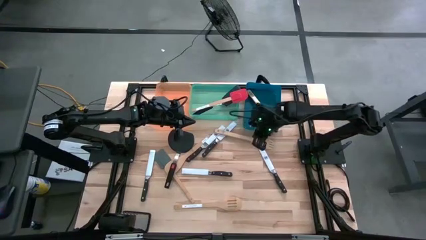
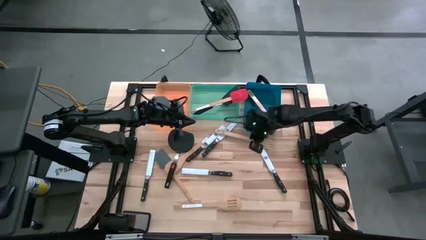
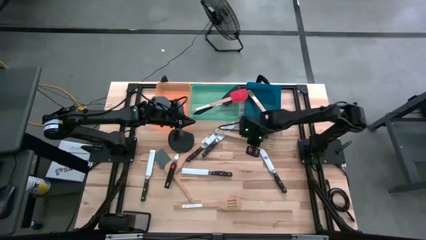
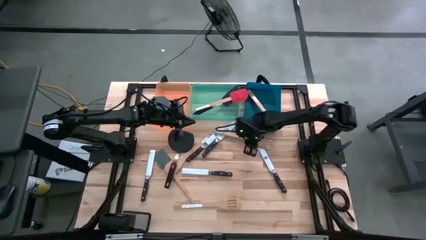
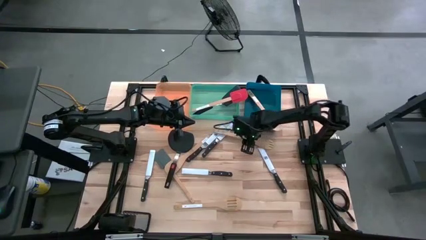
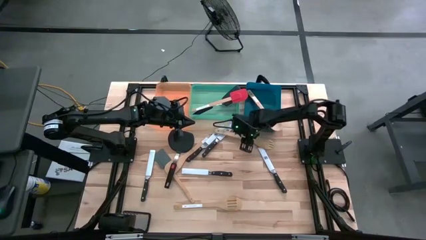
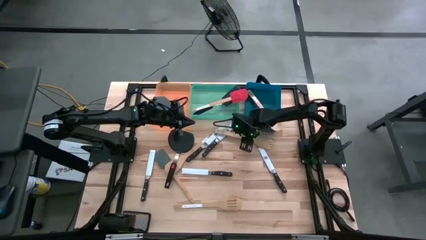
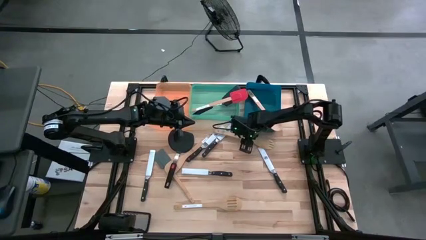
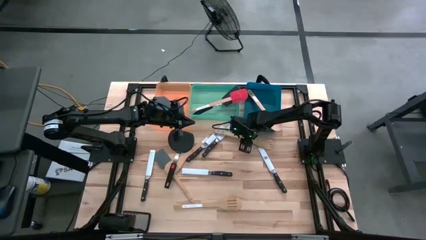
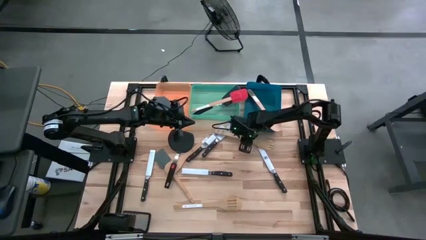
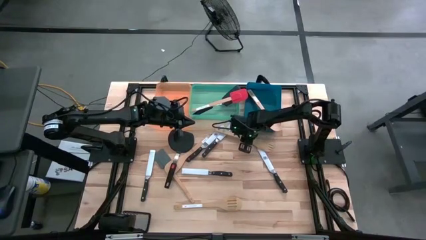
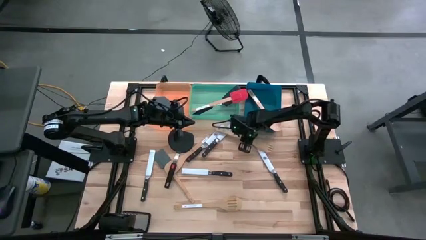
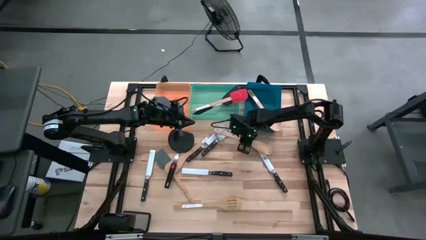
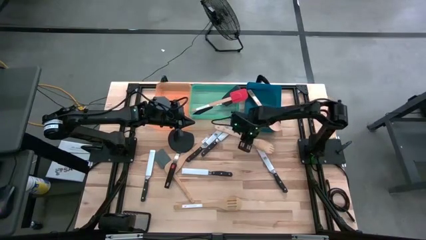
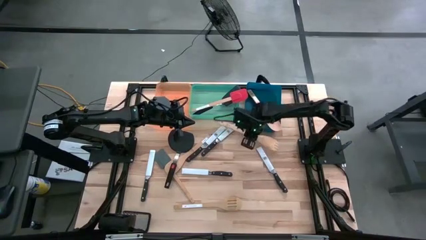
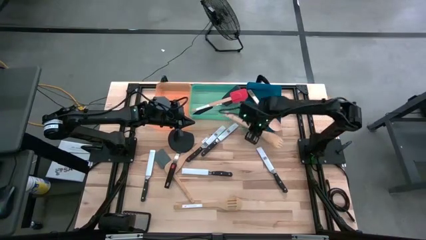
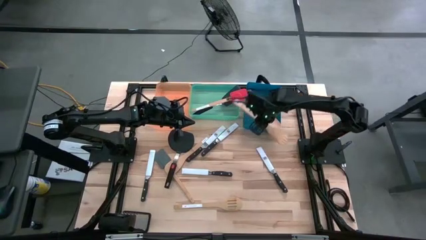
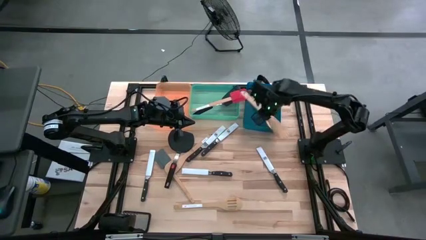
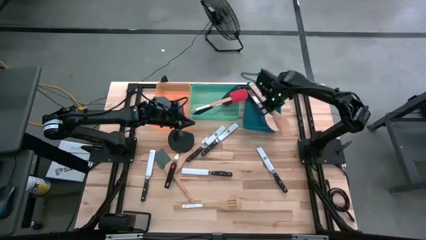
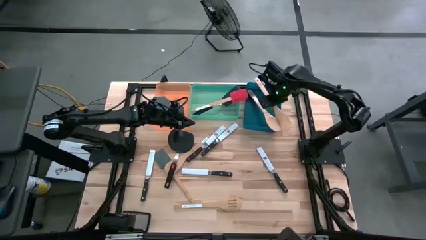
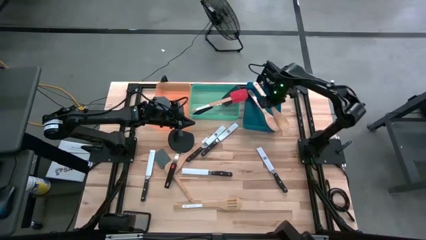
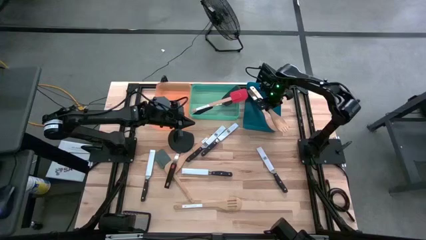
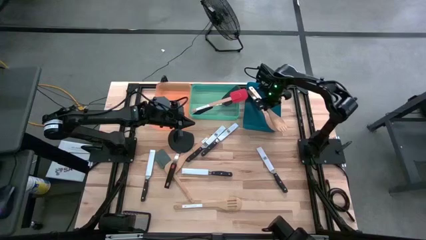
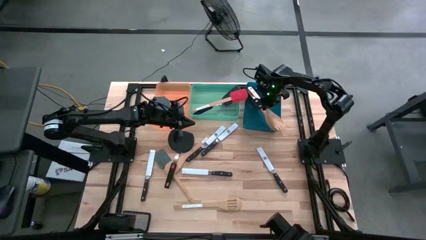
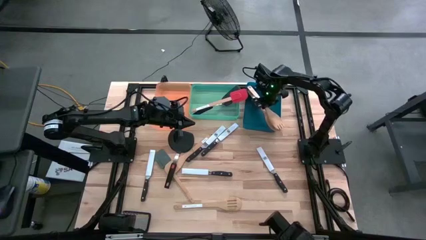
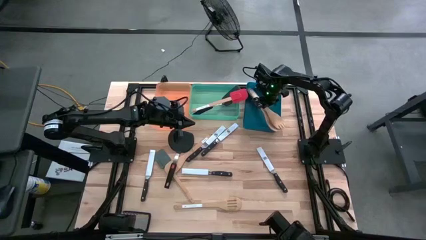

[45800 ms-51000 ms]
Task: Pick & Place Kitchen Items
Put the brown serving spoon into the blue bin

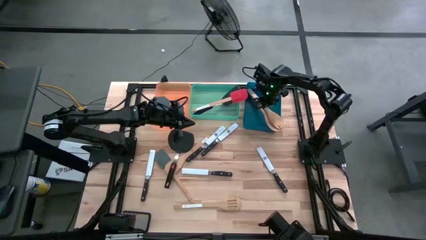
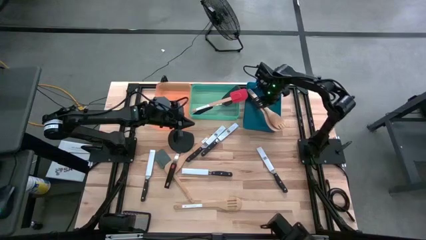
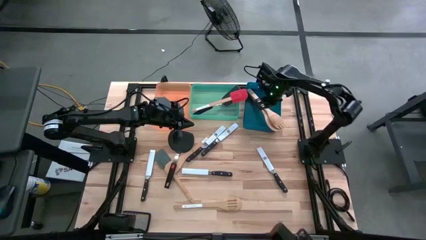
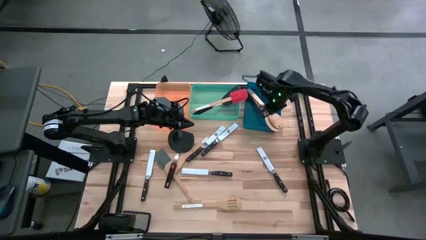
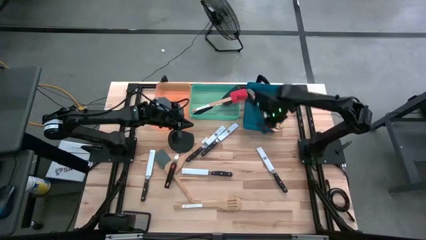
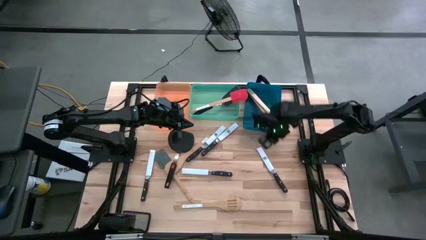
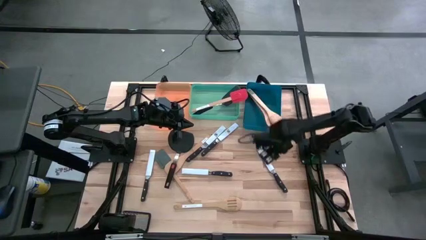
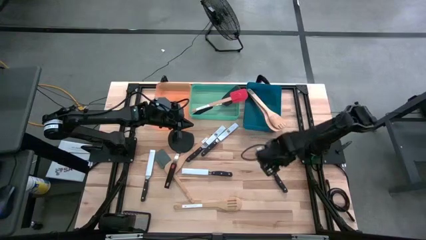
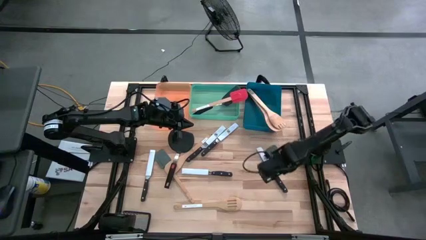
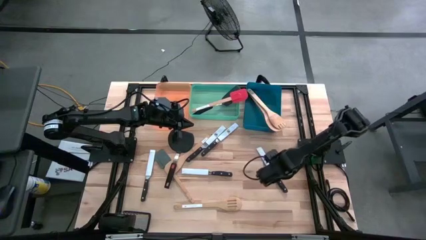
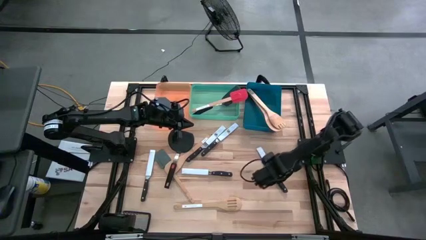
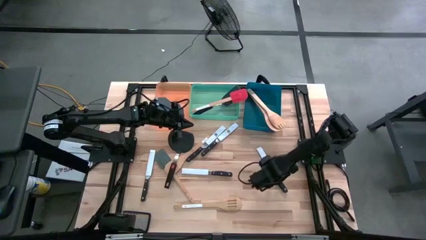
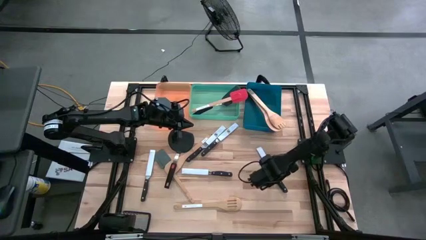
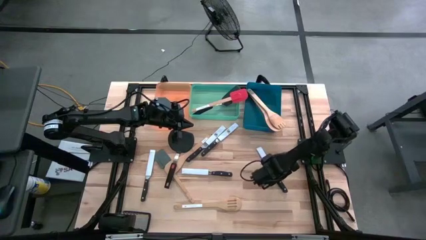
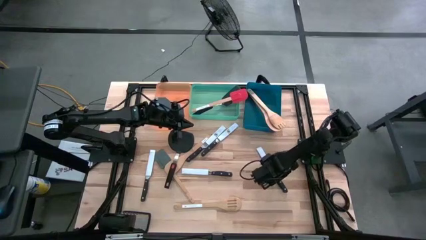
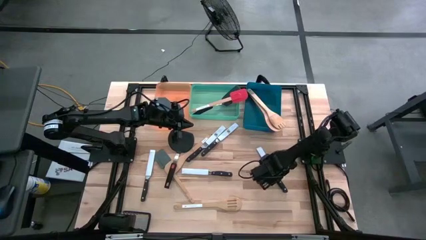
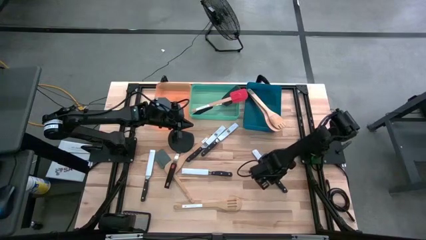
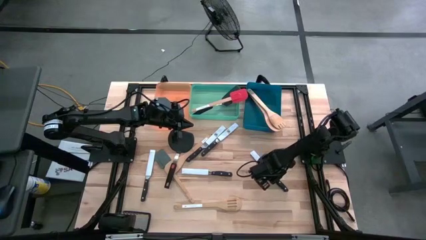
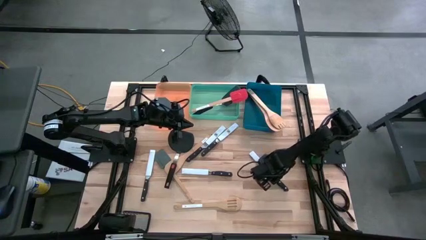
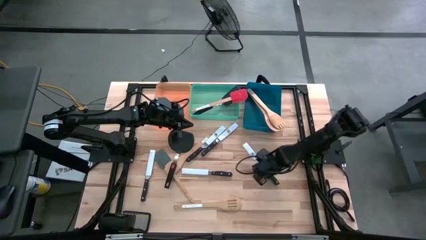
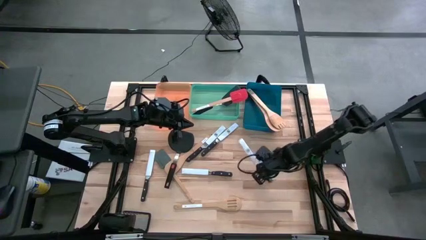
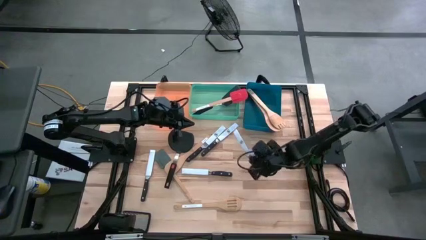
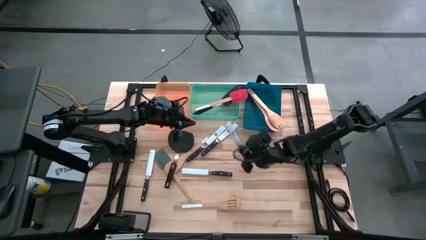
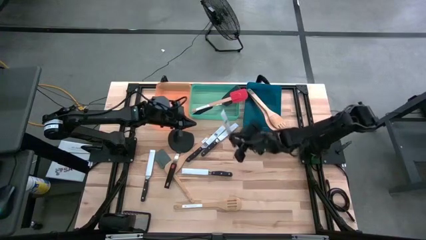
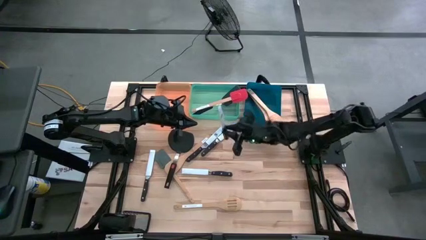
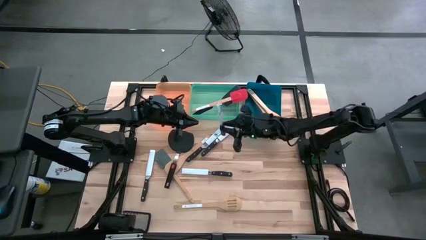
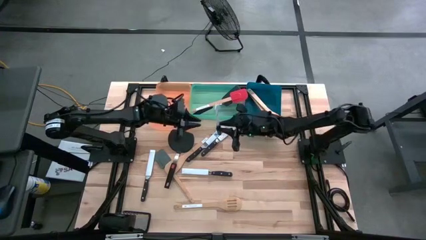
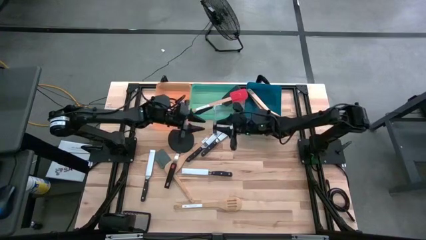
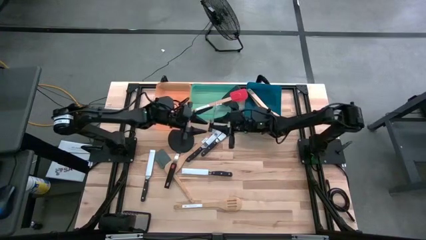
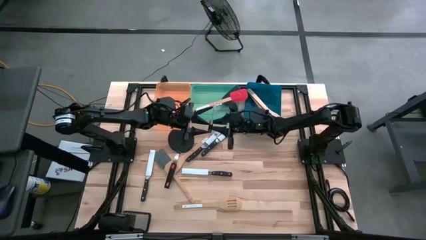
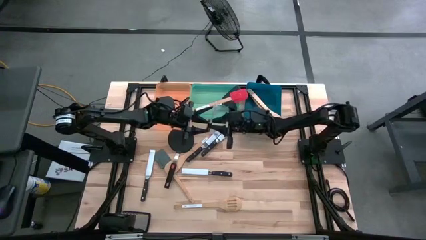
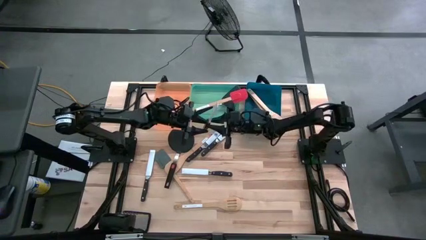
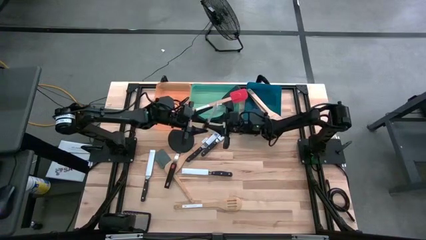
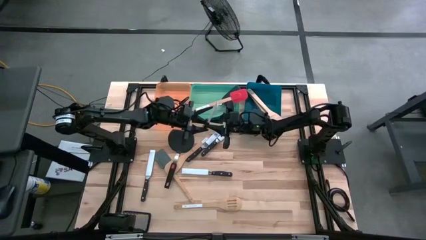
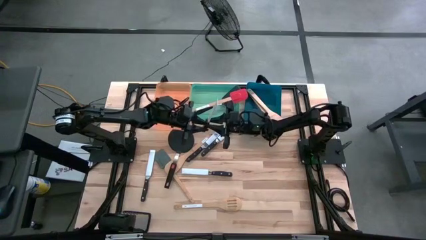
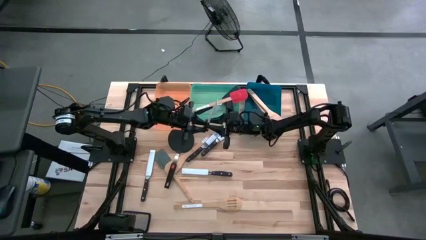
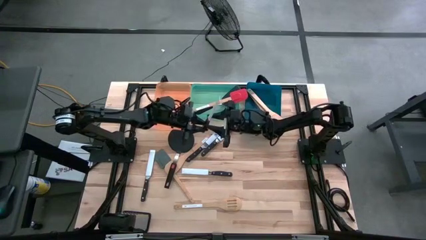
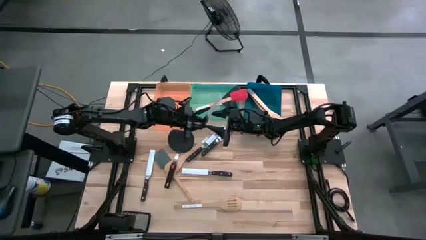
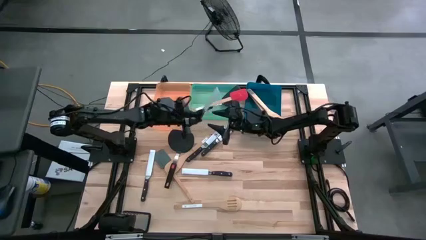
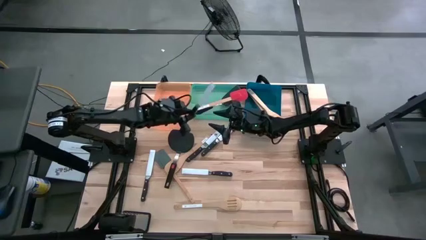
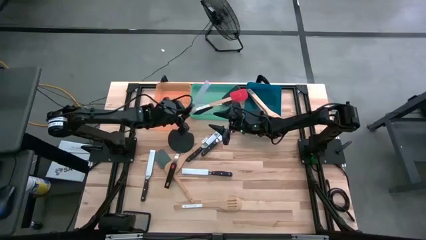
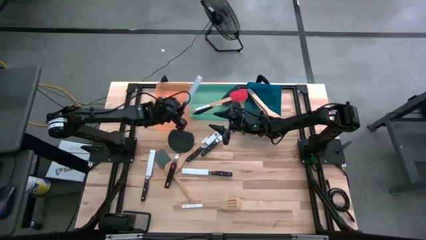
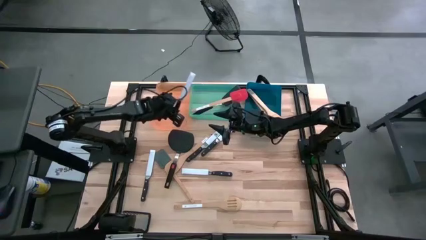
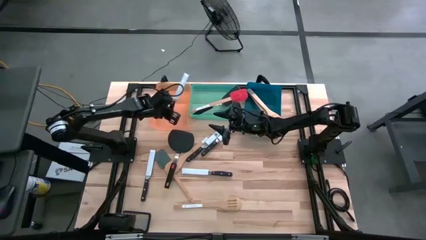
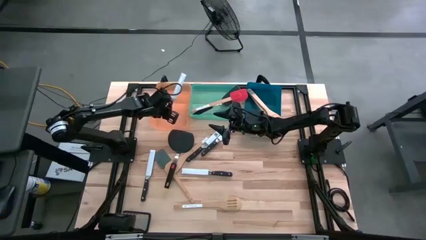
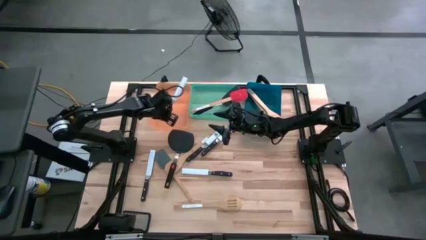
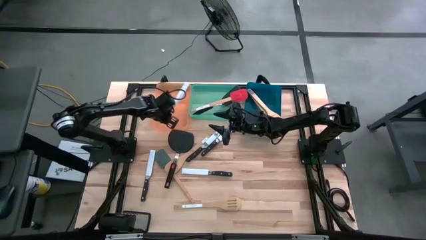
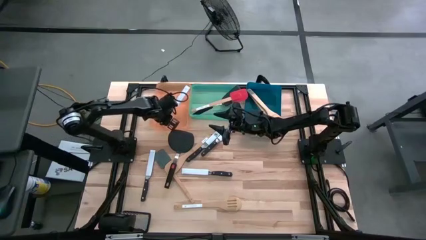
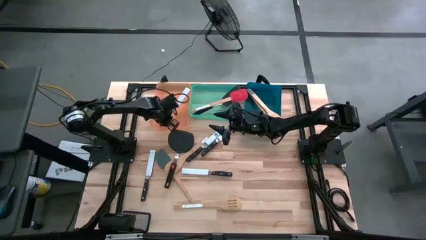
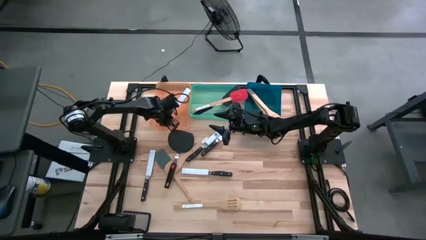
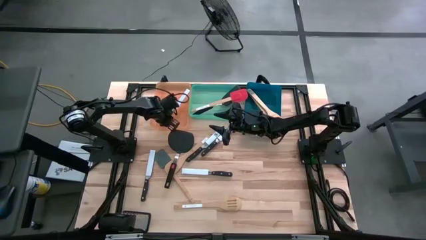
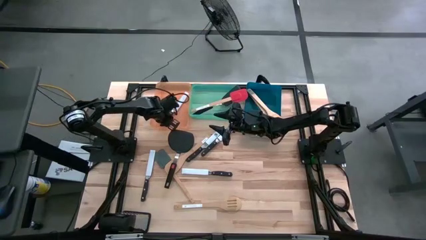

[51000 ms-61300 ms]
Put the black knife into the orange bin
